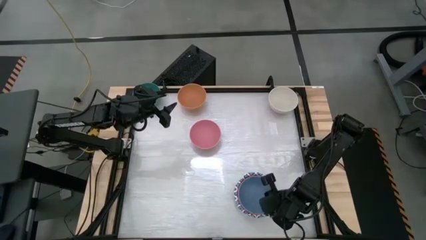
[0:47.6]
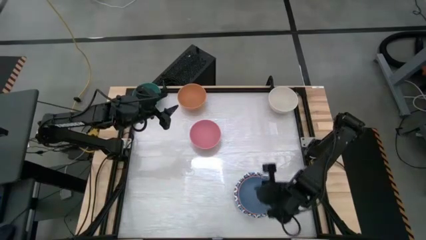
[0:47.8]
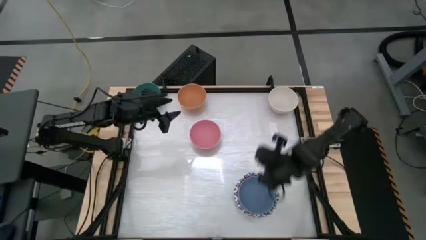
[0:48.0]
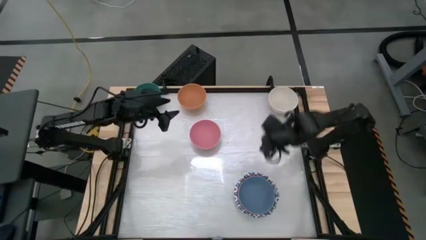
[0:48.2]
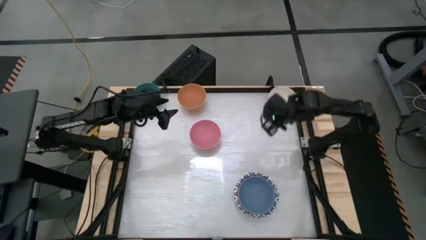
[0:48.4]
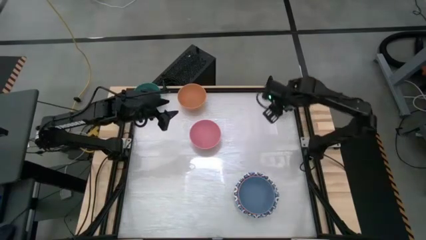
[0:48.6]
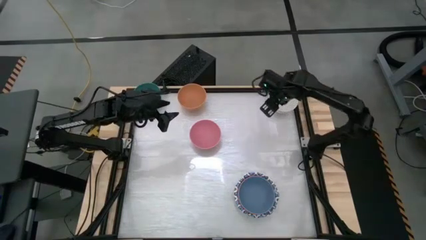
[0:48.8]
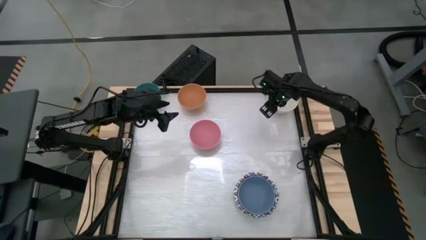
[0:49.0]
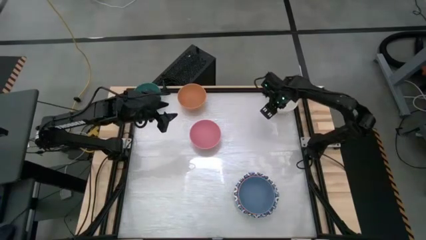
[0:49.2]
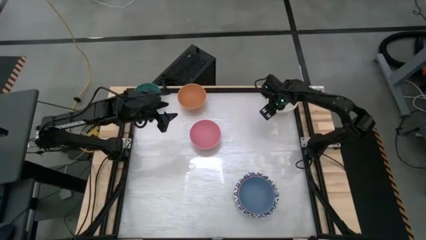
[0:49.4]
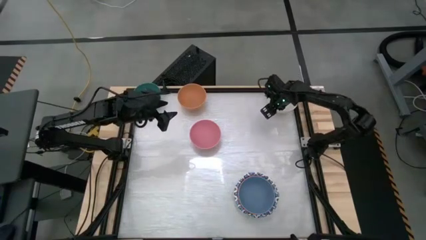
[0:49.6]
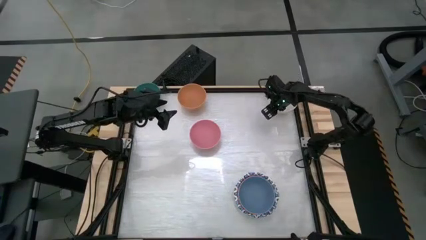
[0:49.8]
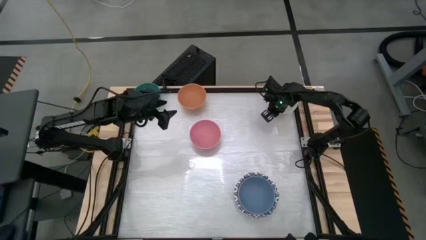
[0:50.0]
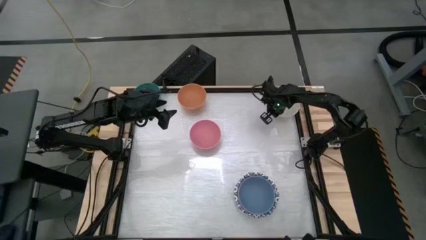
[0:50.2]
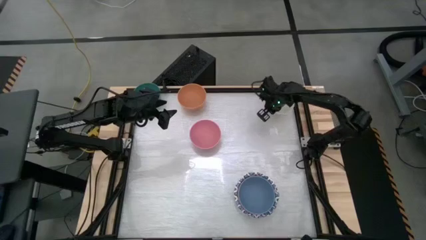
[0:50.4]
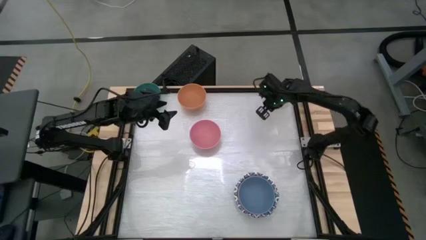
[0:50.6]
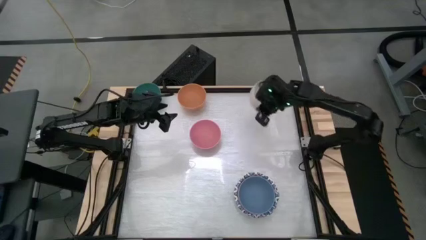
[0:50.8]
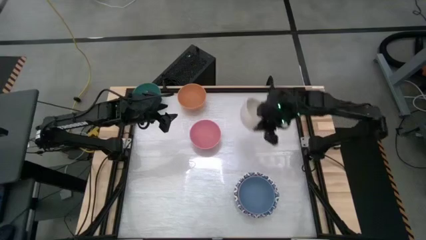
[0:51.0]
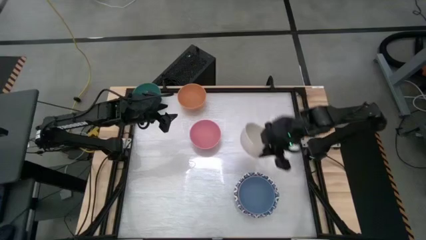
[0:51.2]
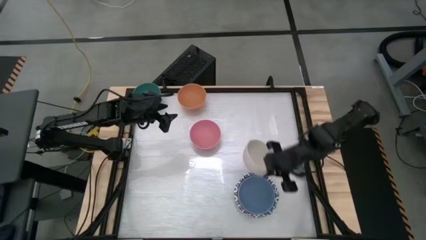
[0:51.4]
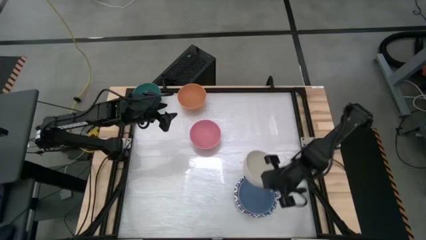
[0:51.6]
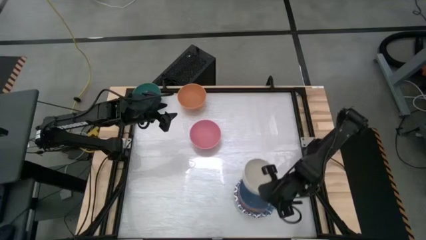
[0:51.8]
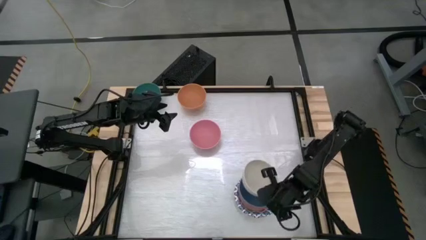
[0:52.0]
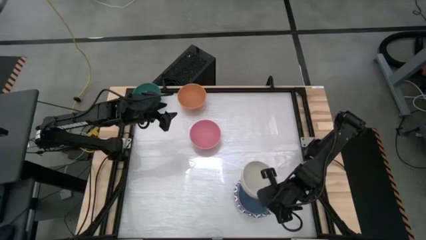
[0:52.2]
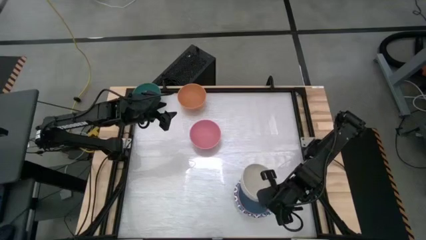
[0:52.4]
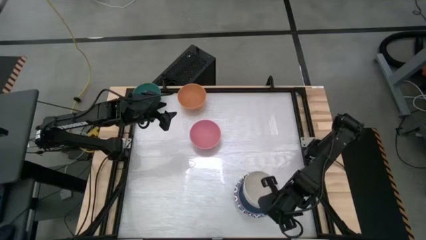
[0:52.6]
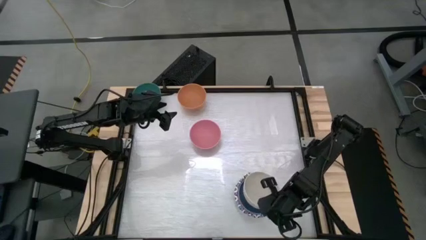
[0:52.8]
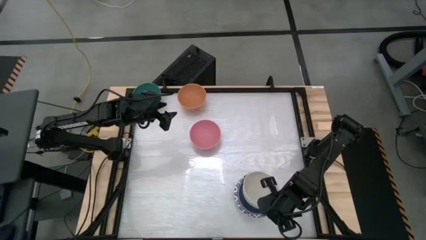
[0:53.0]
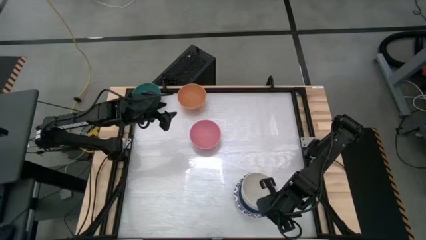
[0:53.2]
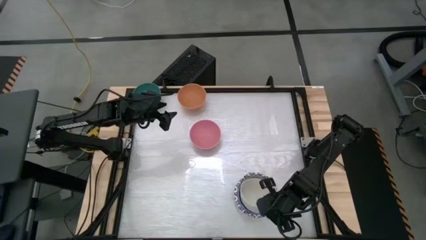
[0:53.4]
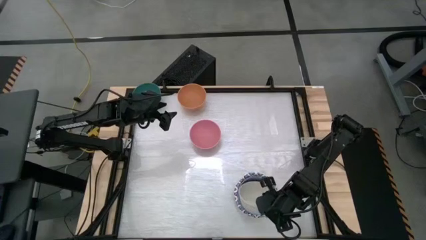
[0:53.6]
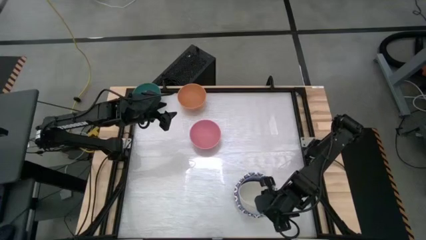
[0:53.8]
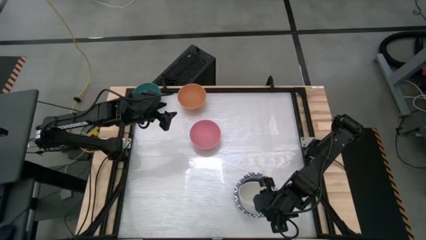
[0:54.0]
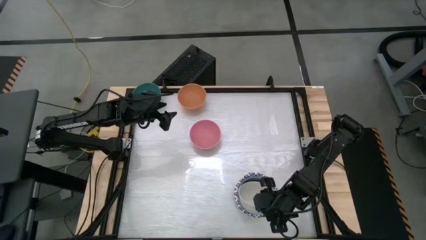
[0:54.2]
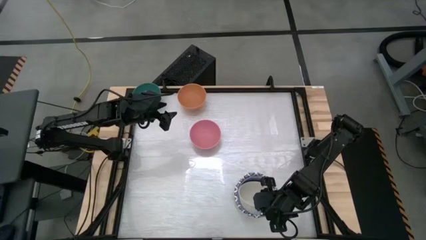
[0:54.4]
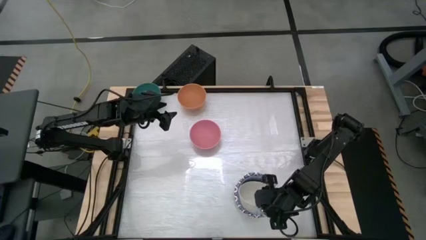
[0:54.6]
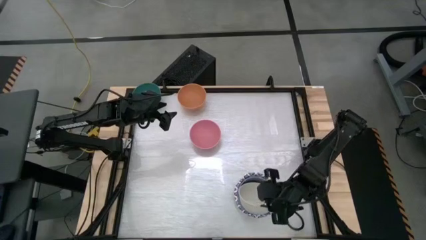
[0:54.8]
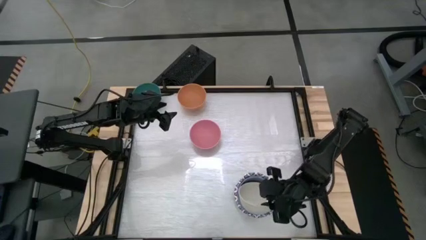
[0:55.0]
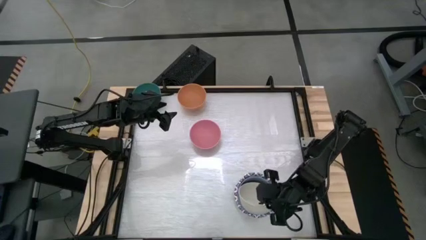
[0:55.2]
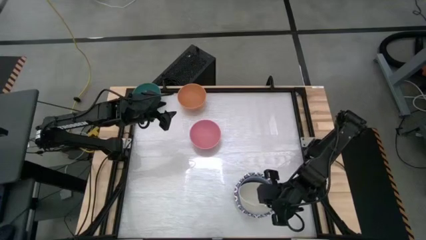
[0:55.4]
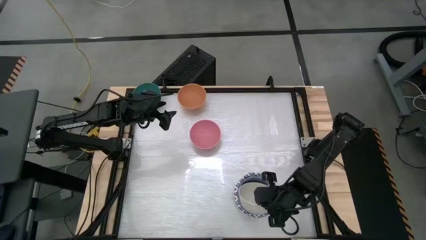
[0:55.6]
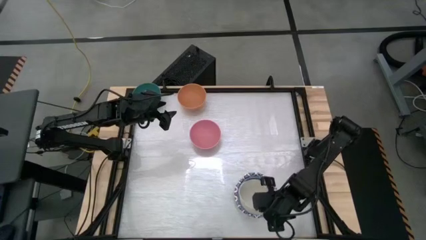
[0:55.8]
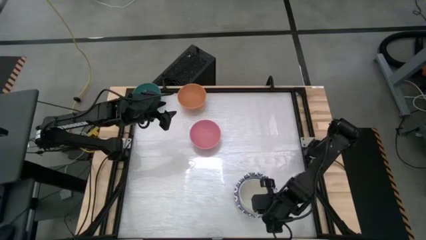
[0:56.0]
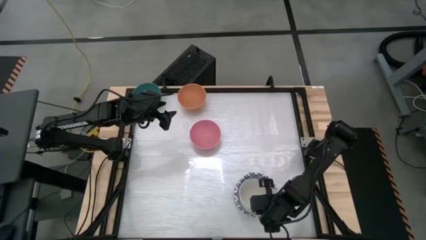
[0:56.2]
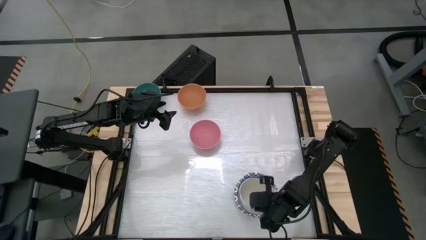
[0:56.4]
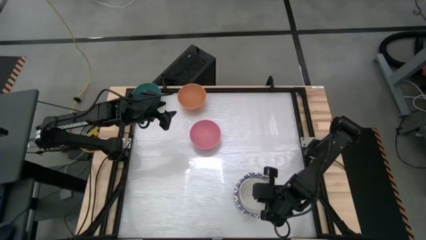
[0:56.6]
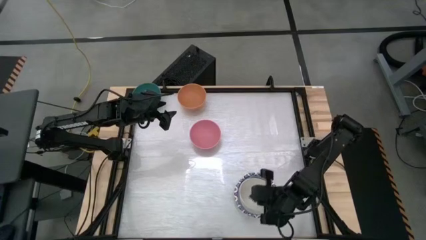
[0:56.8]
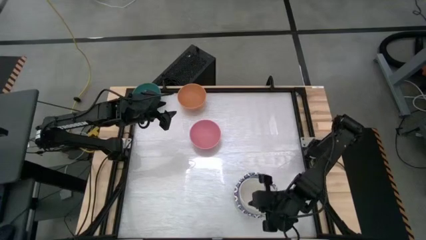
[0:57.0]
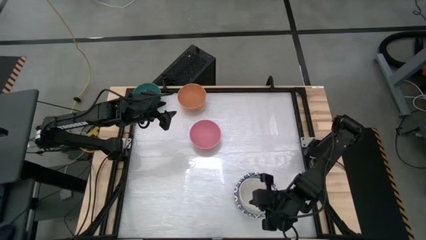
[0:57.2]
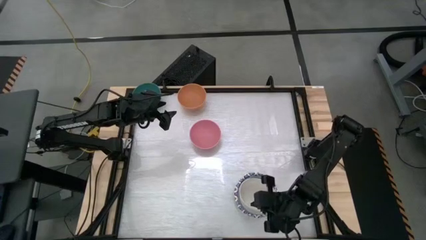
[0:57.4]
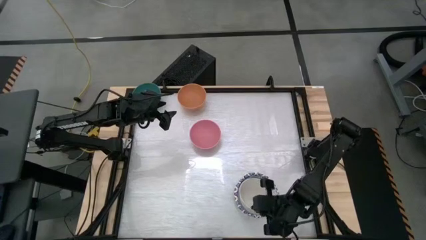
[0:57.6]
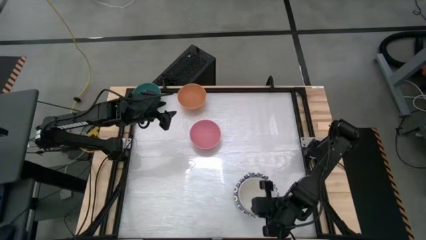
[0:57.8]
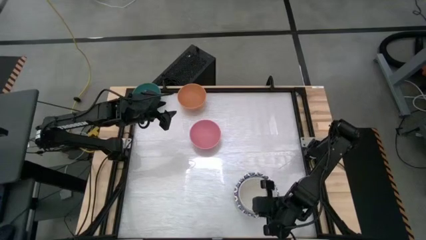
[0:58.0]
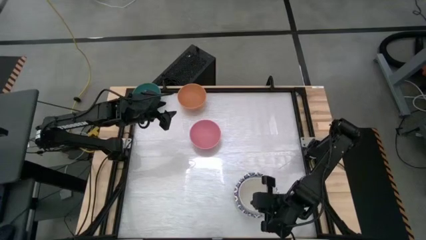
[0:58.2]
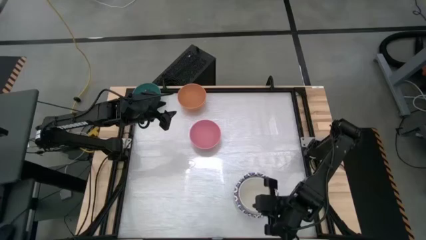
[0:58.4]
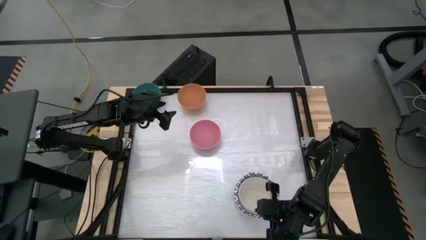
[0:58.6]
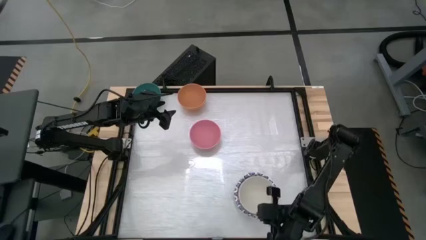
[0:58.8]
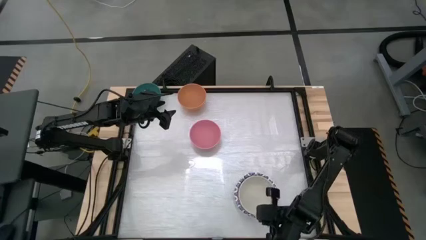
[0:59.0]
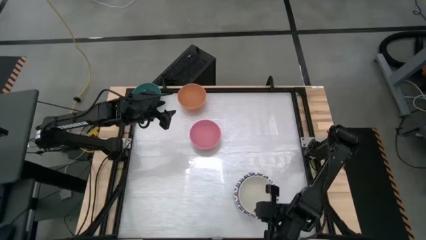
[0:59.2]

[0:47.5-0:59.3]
Stack the gray bowl on top of the blue bowl

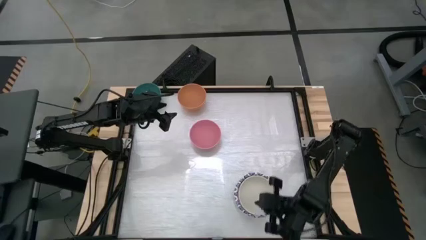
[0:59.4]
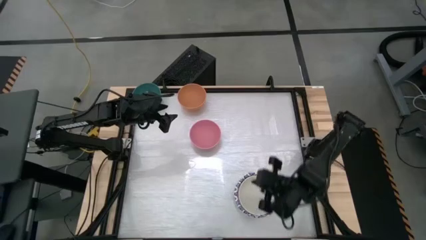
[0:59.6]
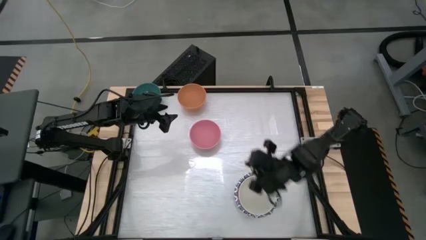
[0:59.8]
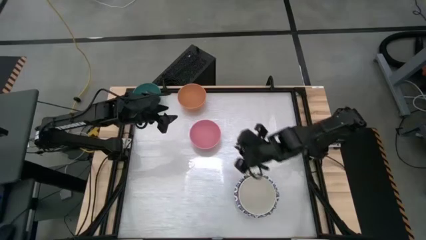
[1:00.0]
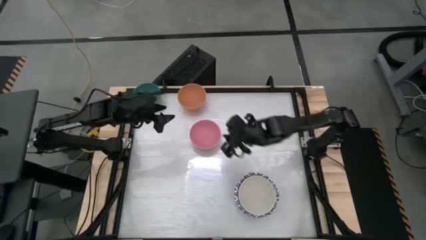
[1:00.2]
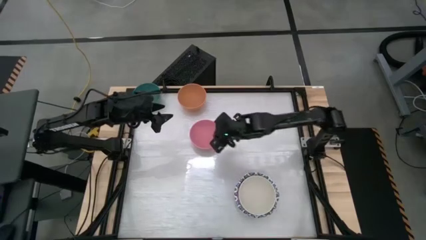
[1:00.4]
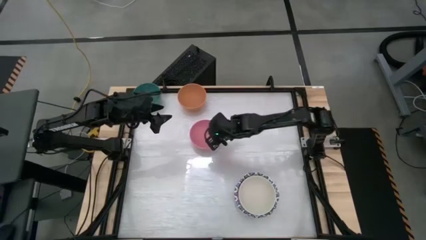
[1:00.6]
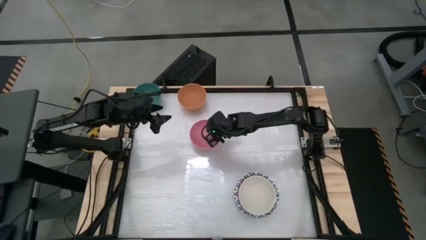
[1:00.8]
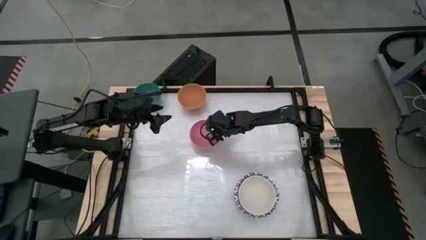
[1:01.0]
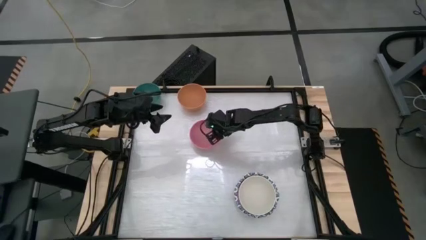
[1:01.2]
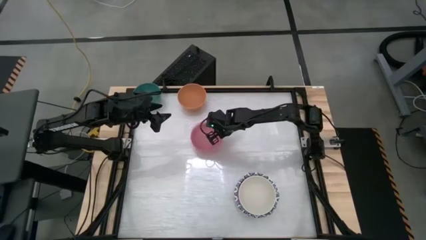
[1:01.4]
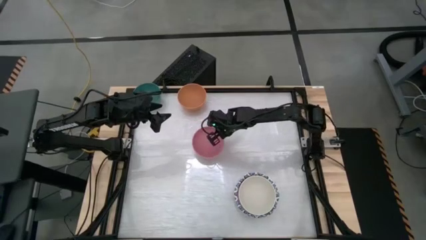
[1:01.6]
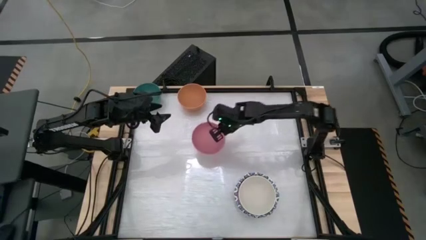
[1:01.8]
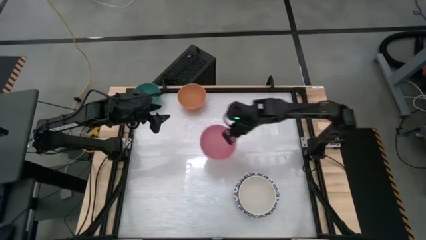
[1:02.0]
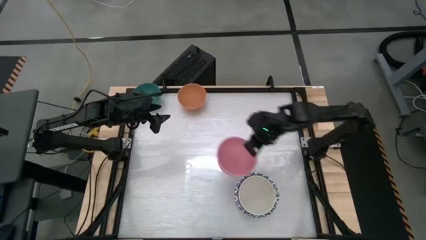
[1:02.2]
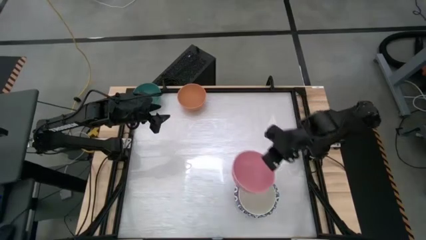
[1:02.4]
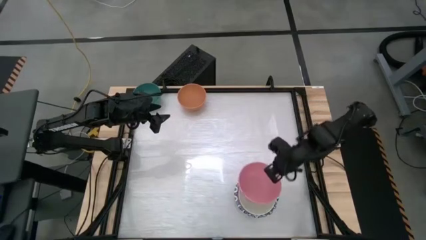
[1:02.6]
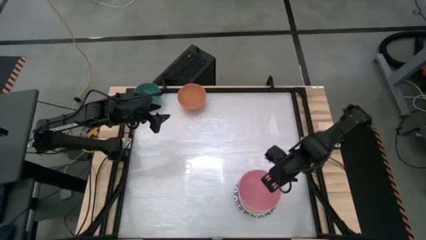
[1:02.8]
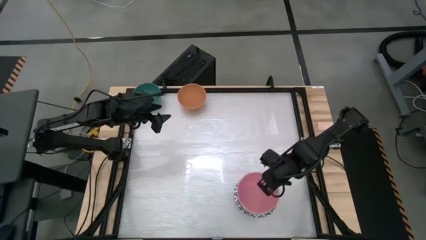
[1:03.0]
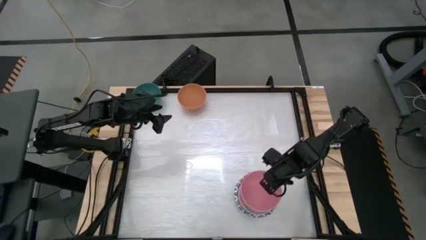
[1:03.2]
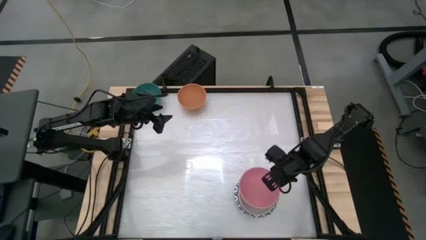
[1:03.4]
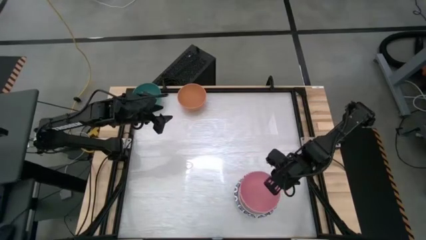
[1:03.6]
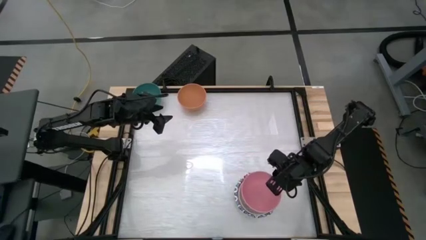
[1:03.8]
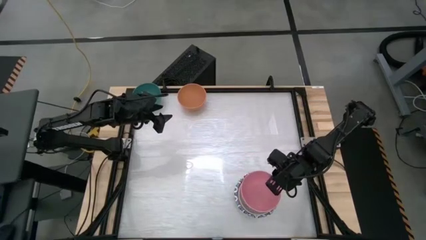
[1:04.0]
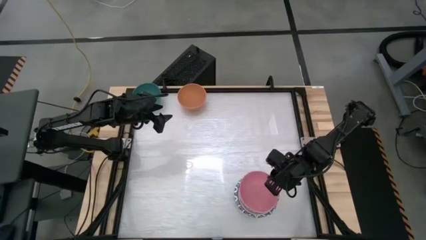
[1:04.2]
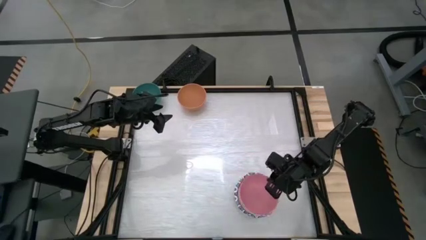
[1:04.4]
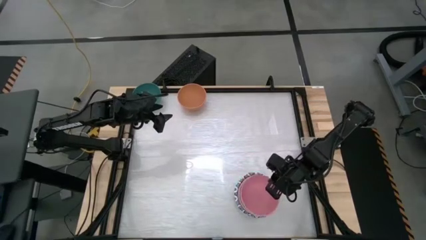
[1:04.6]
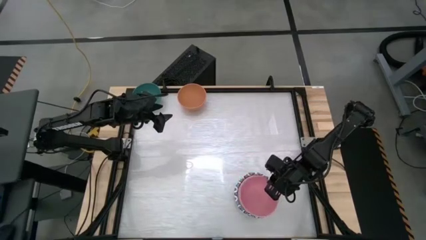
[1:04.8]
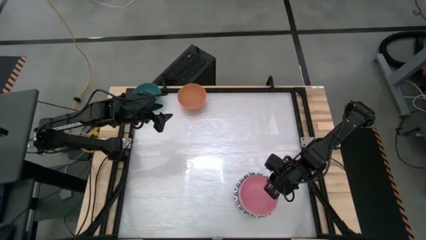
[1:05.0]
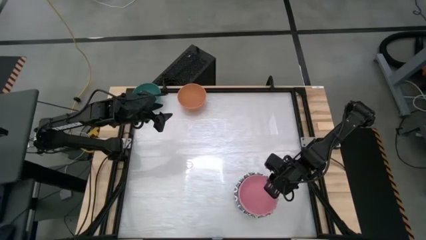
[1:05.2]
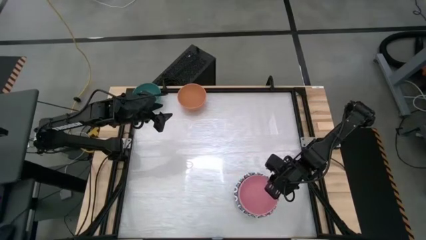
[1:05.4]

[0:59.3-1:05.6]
Stack the pink bowl on top of the gray bowl
